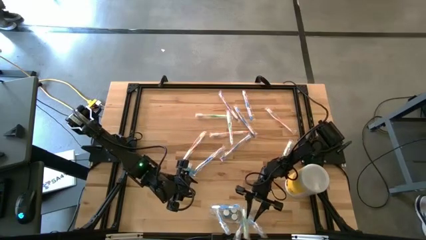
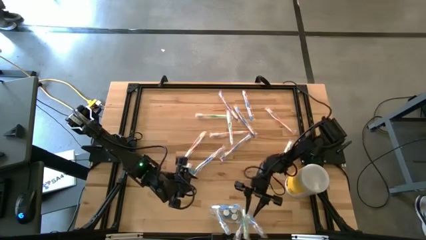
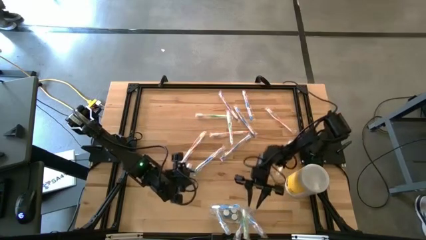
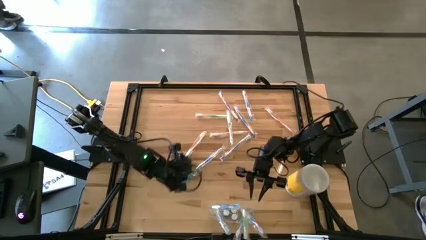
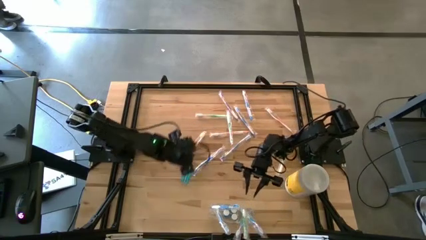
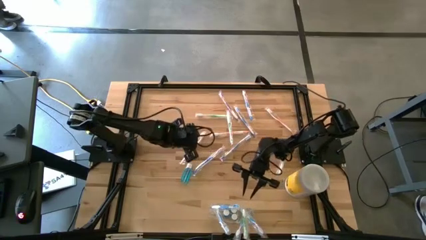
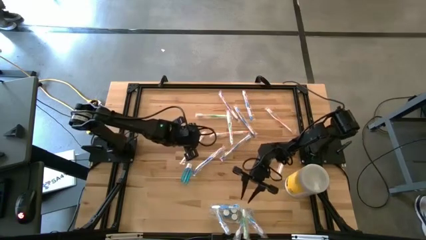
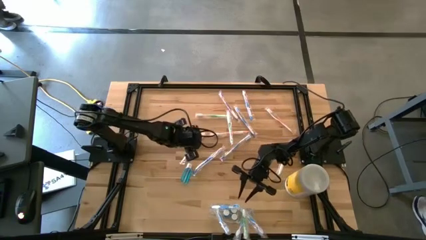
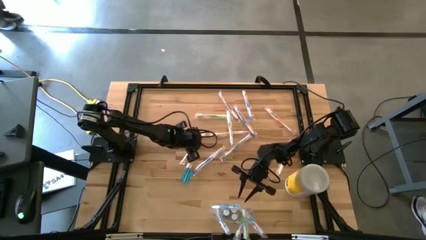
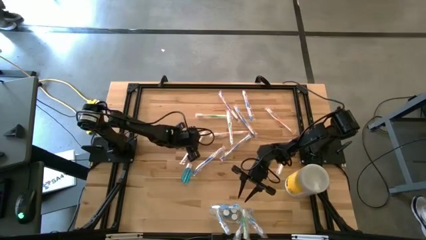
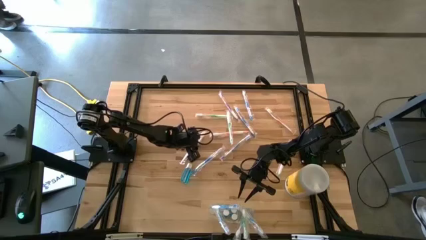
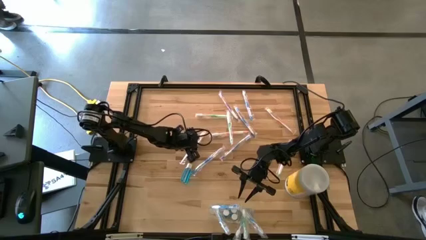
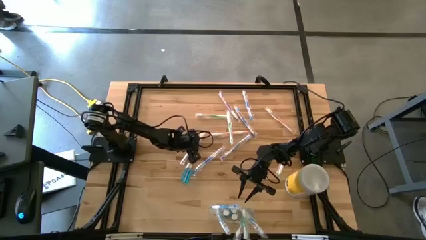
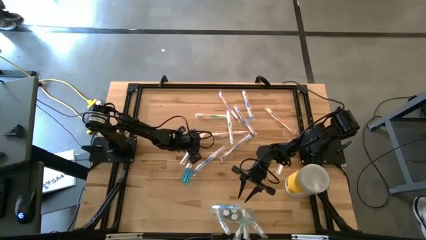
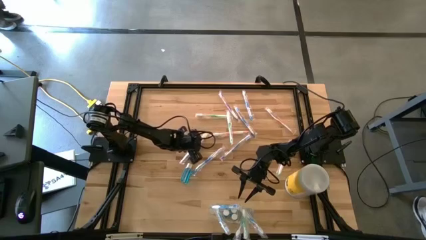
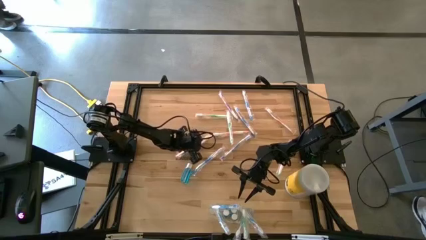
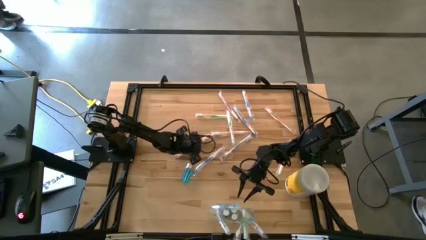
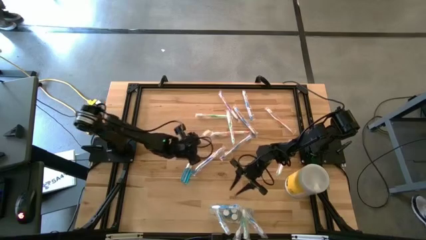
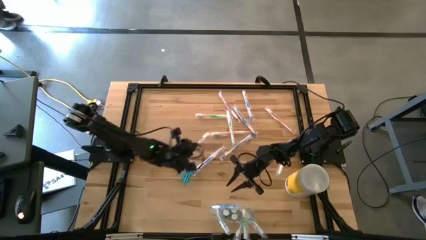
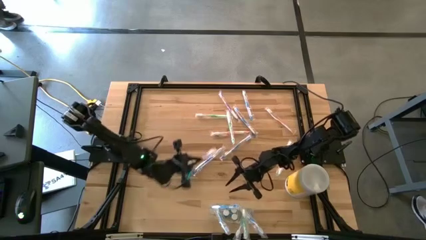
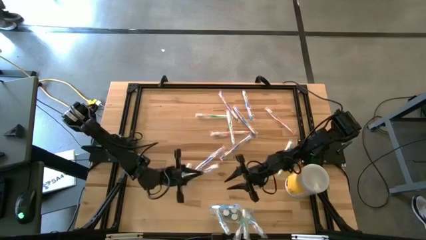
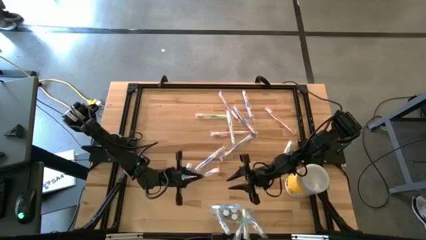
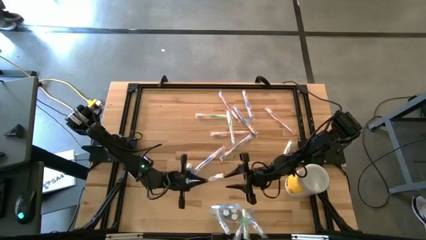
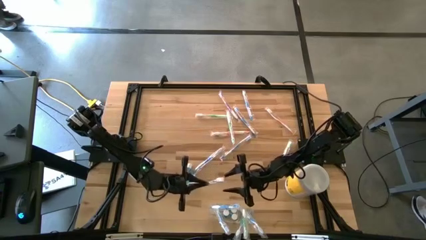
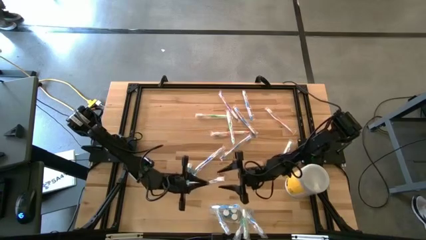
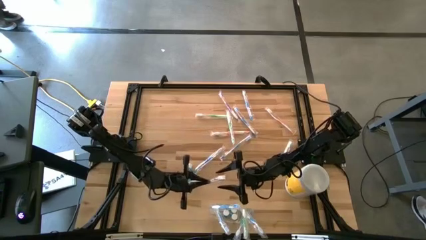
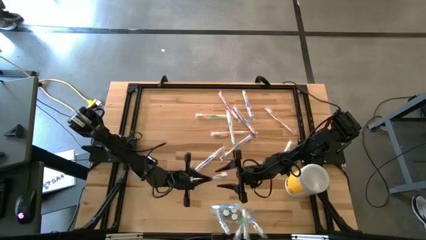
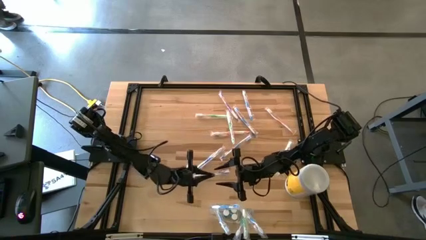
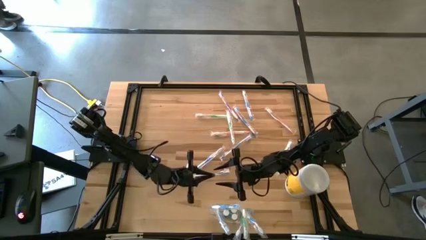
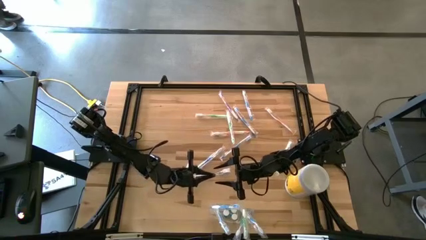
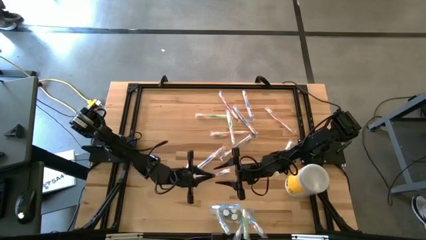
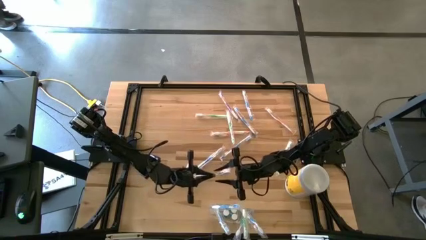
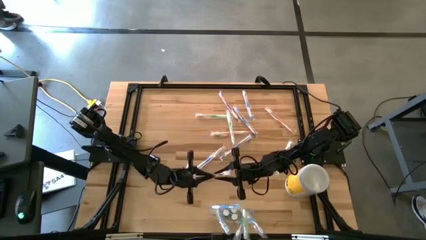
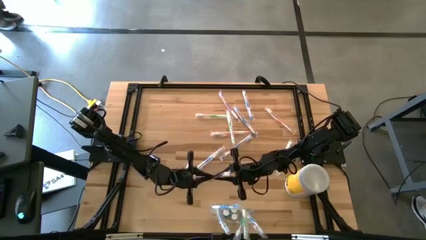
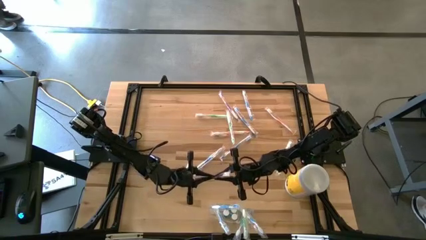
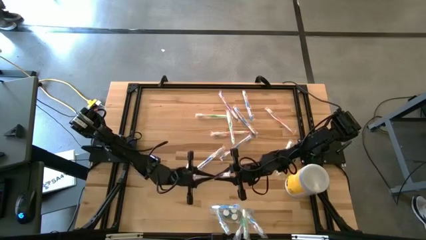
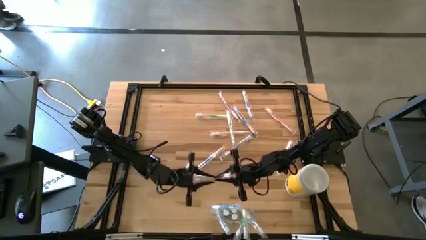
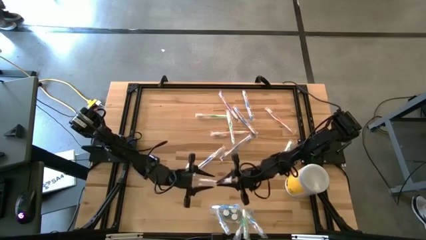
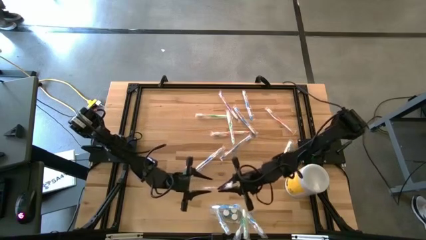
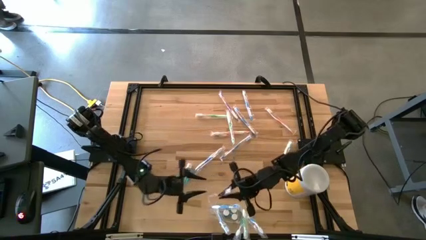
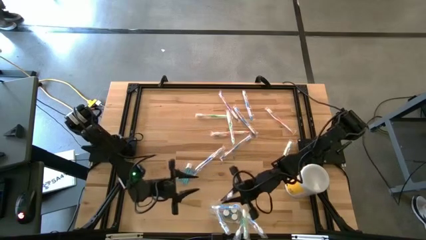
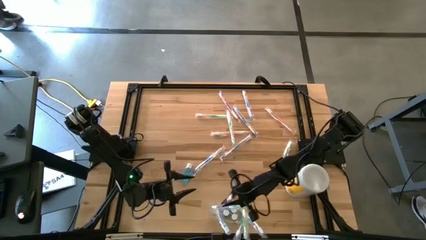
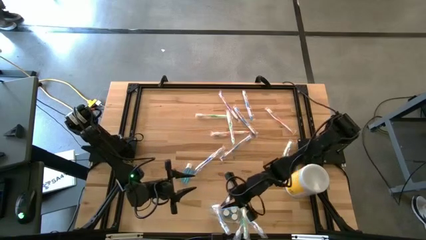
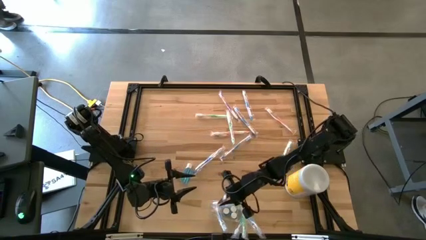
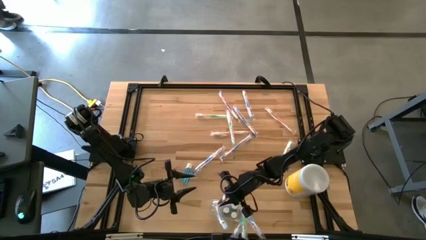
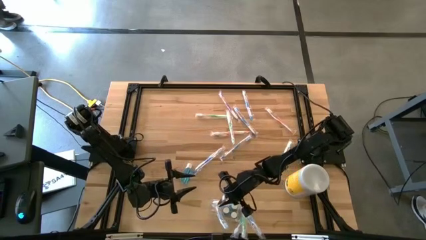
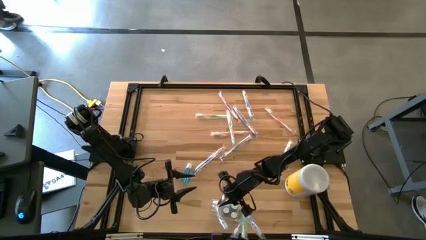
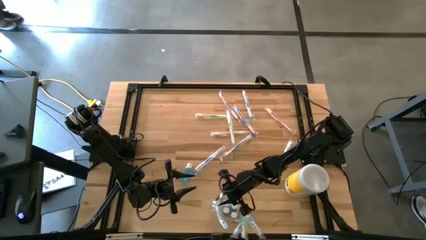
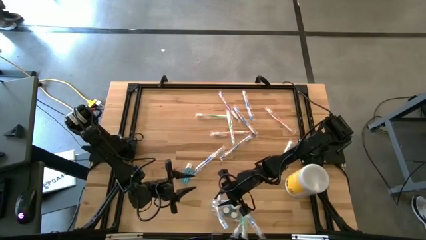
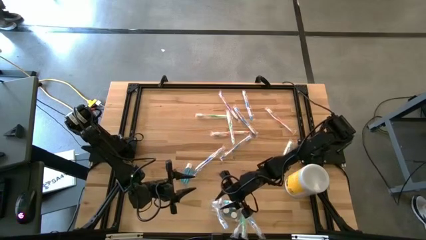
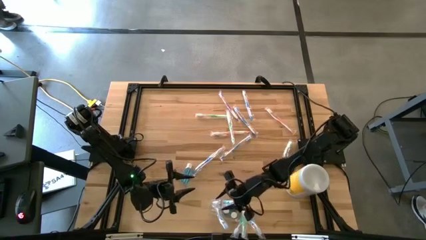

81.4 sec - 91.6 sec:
Task: Pick & Place toothbrushing station
Put the orange toothbrush into the transparent organizer

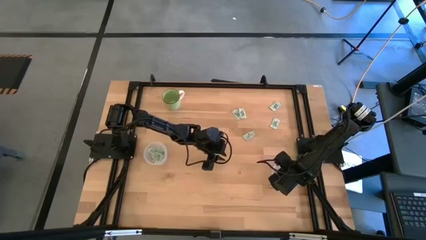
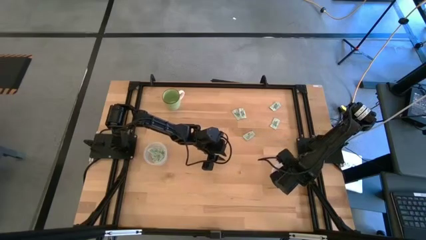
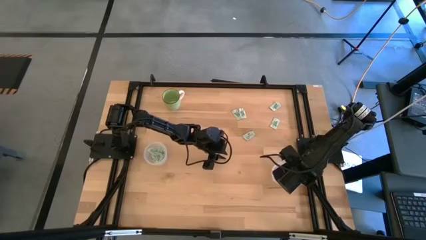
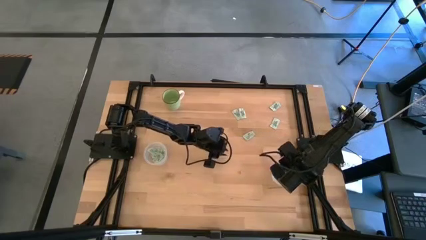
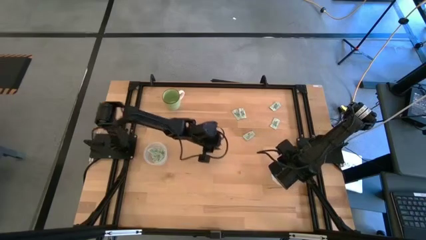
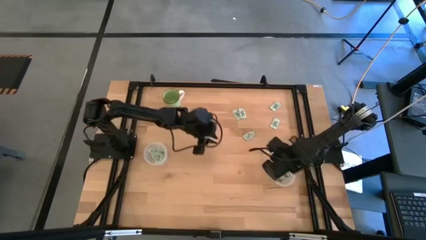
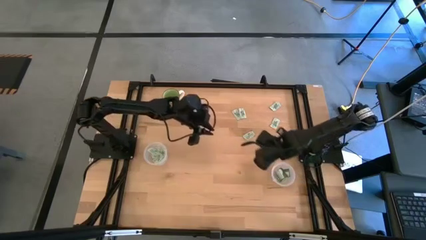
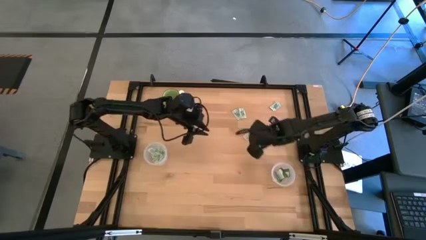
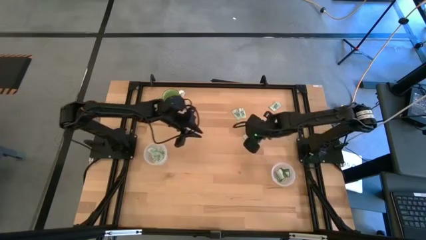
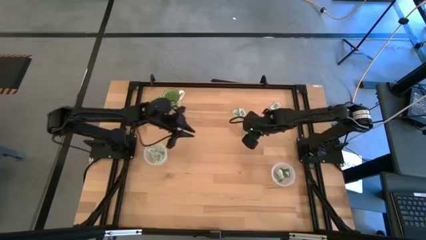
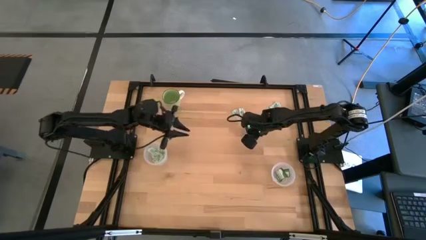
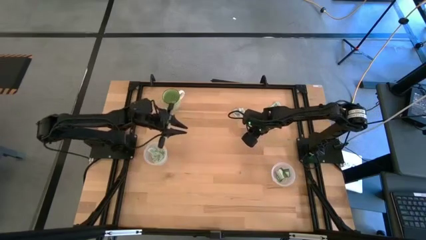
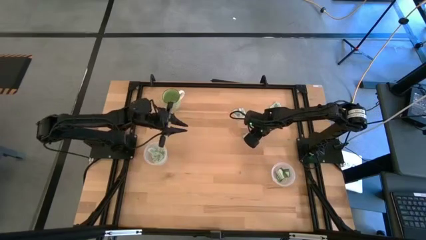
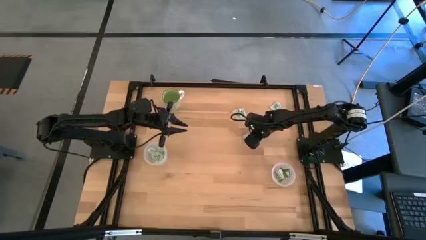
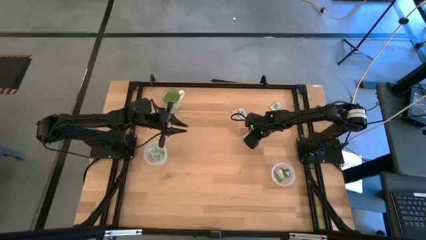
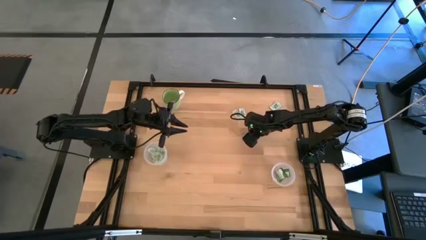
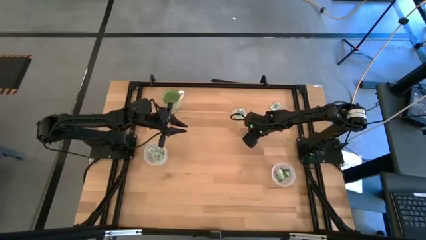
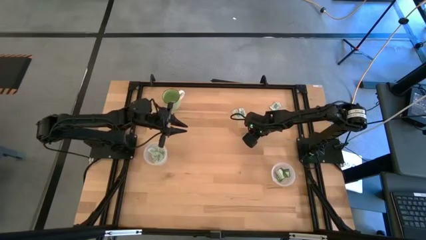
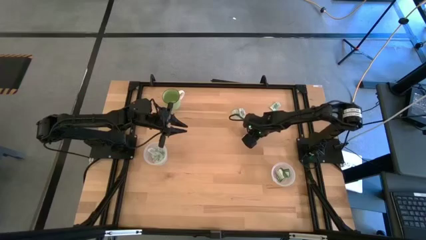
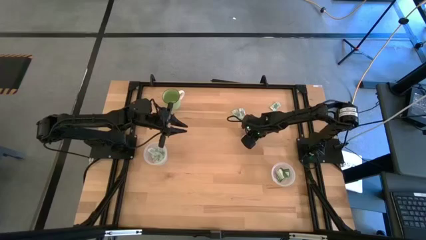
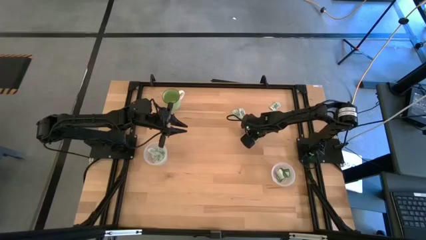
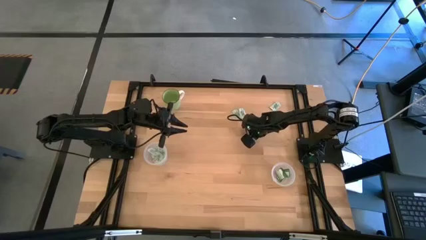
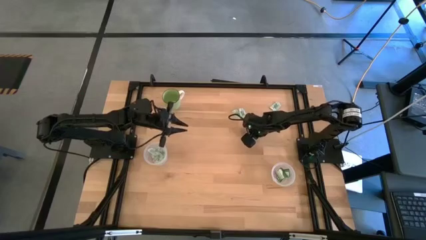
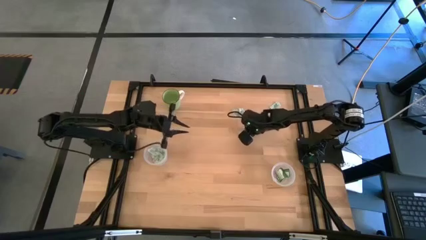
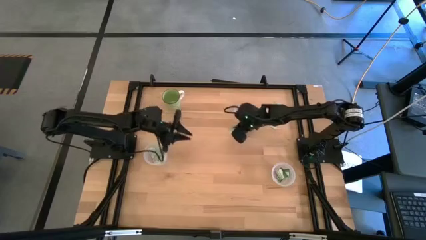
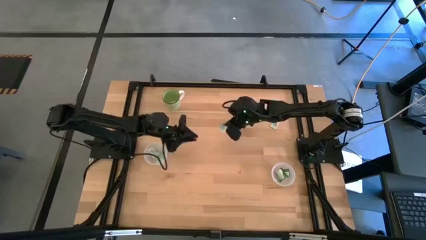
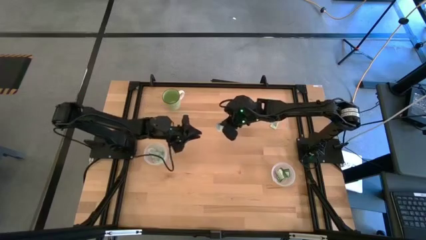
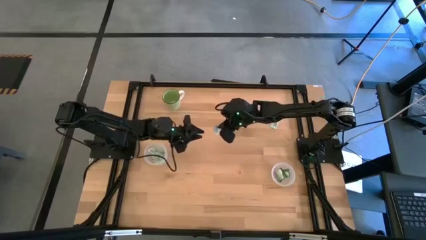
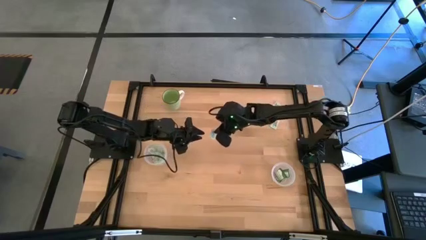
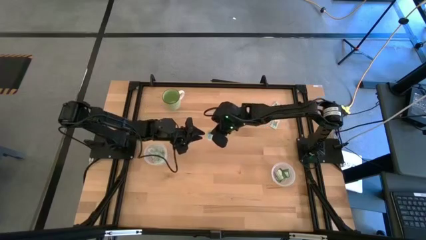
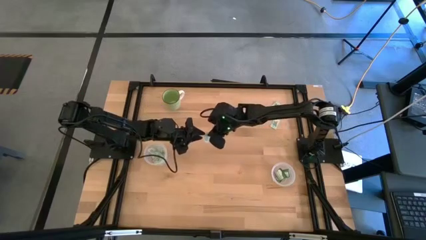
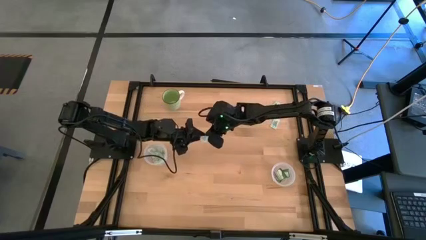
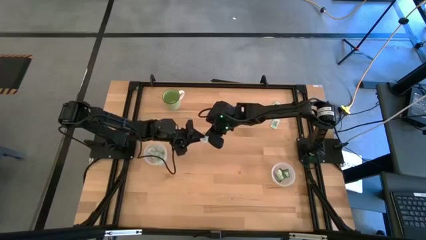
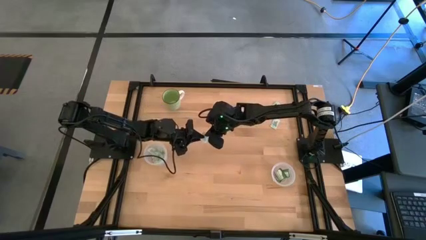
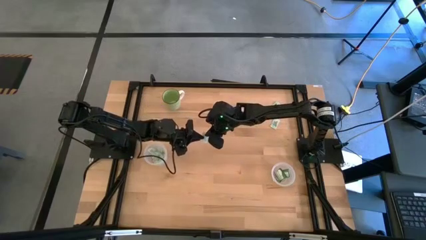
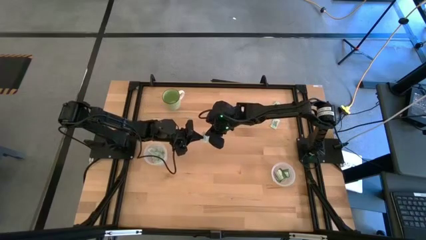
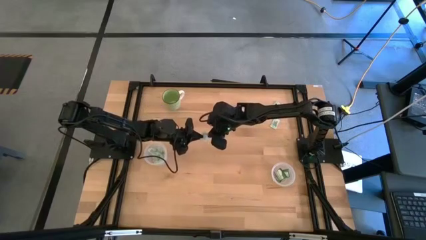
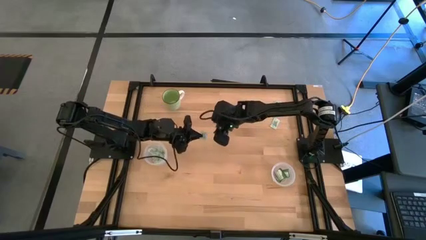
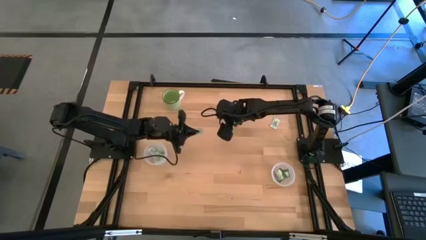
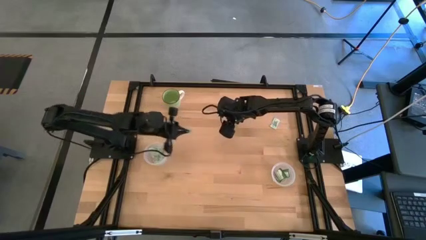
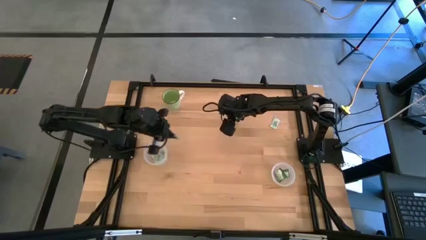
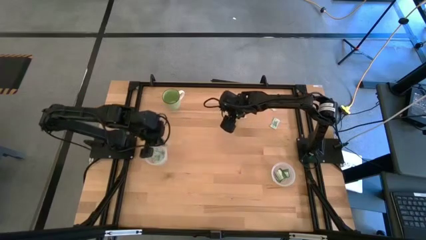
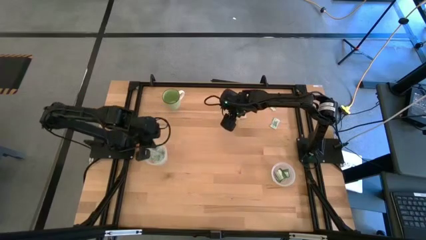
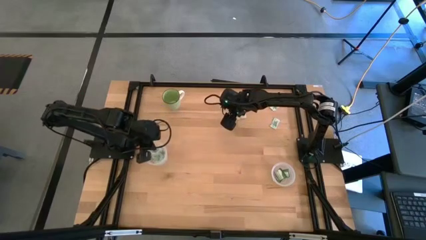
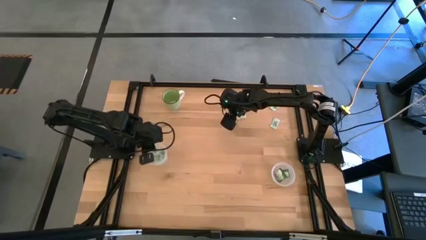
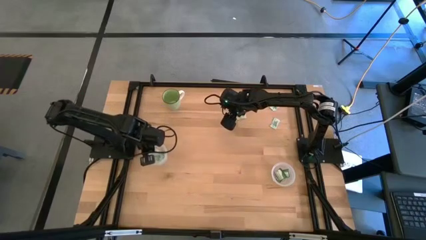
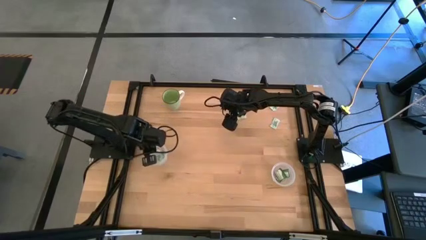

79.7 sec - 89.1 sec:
Task: Pick and place items into bin
Put the stevia packet into the left transparent bin
